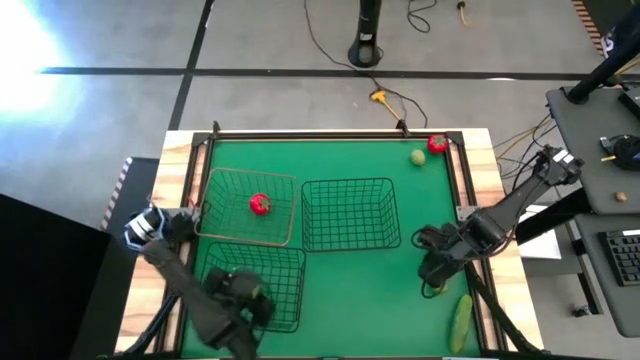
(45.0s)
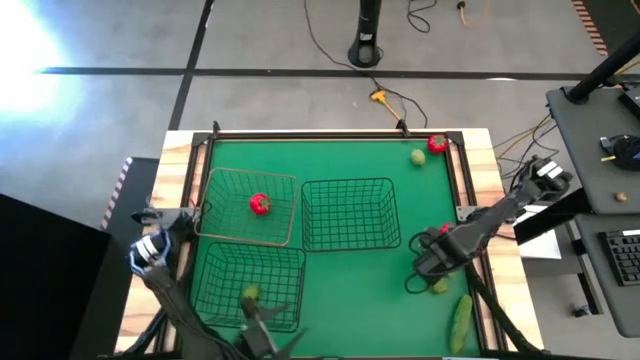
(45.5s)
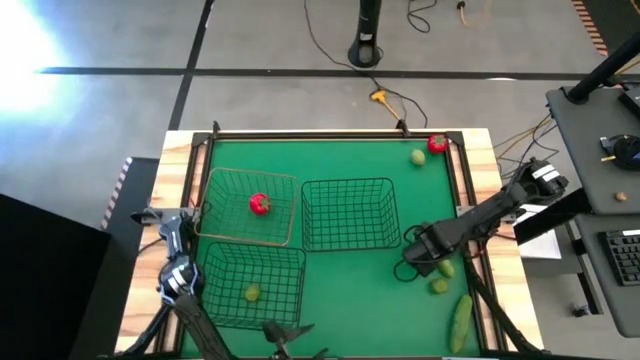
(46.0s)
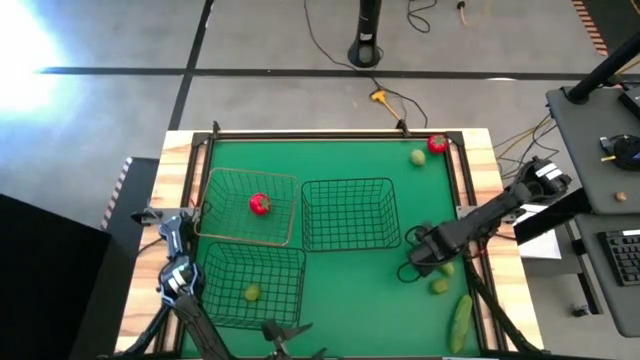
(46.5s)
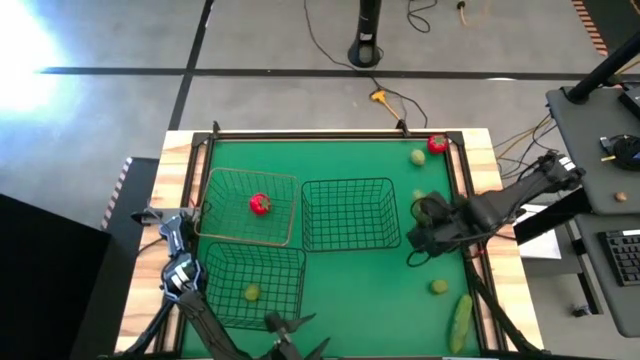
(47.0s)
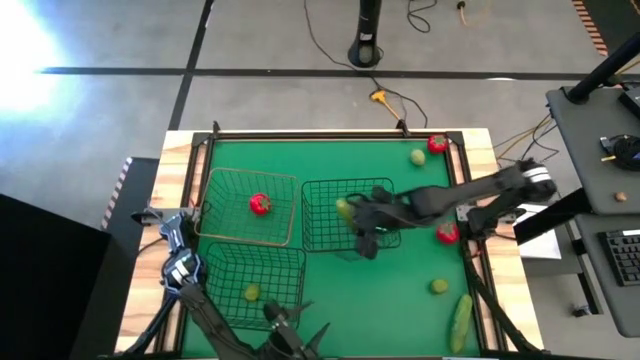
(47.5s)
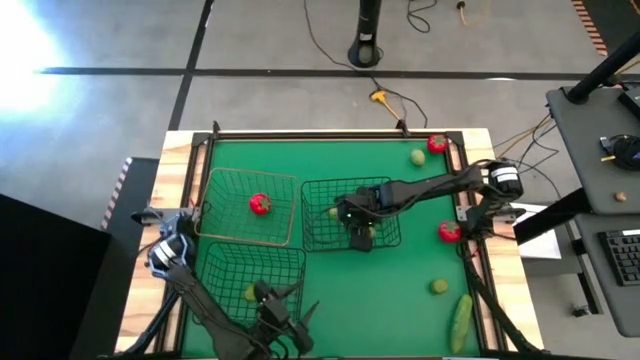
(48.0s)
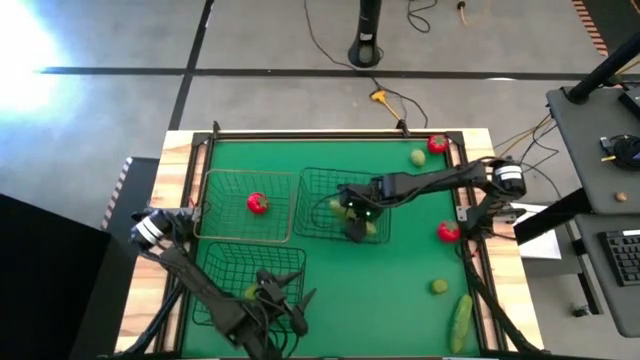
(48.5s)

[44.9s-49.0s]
Task: Sort produce into baskets
Put the top cucumber into the top black wire basket

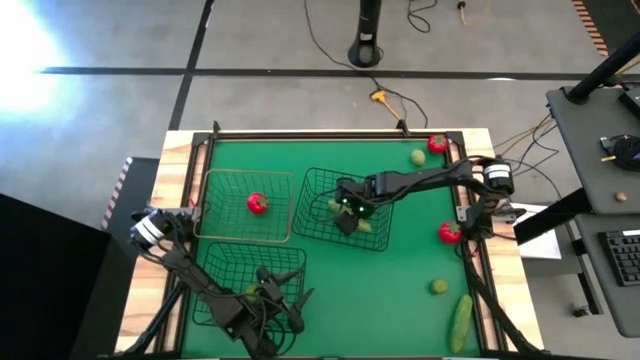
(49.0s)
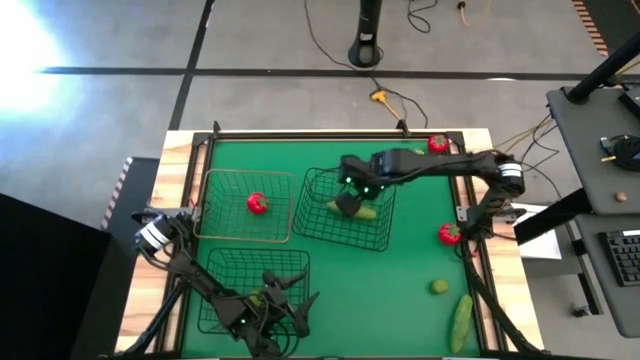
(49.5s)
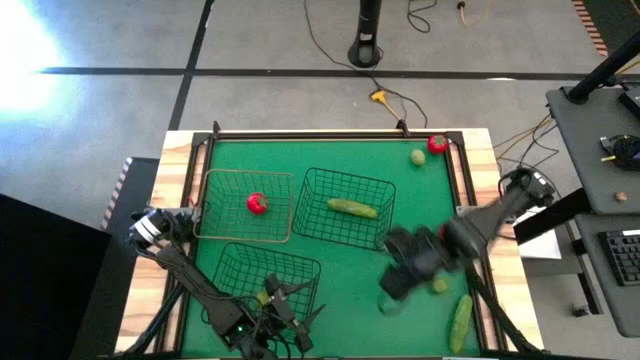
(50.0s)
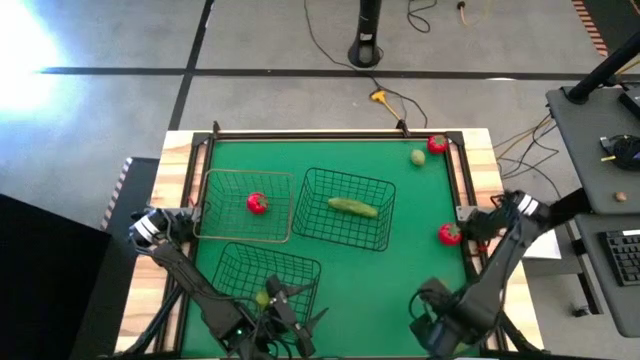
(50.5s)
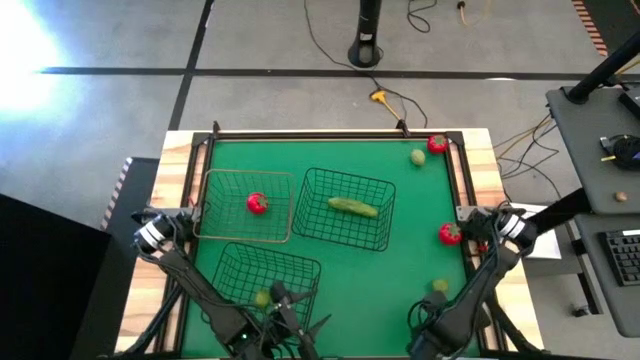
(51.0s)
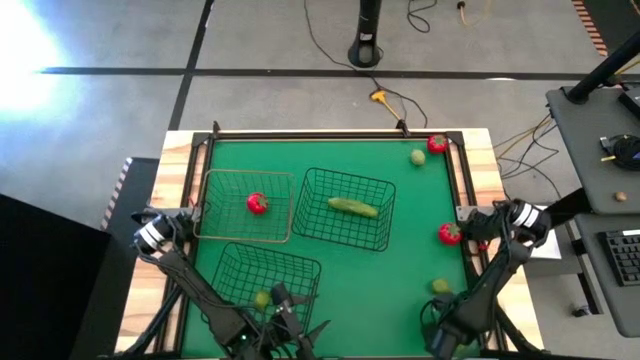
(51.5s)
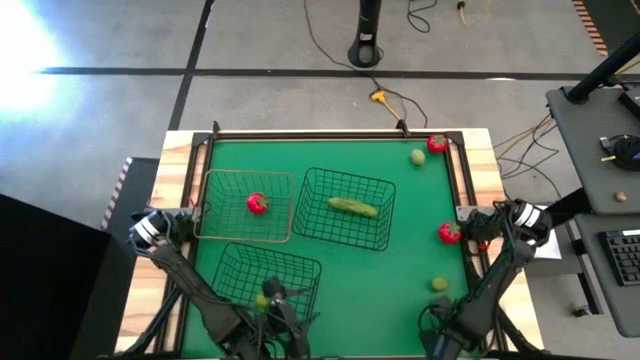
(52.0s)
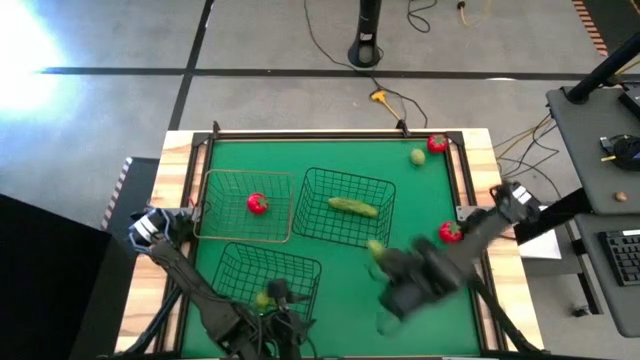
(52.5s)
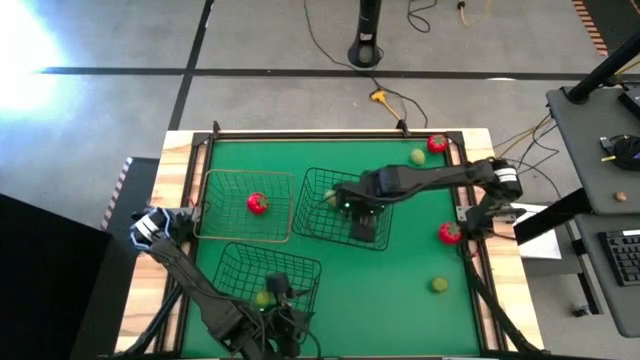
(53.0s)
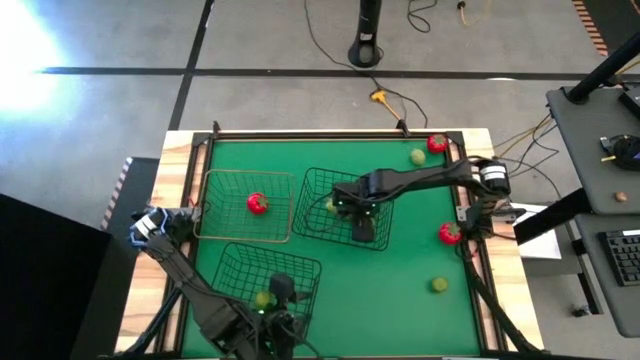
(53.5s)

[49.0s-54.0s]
Put the cucumber into the top black wire basket

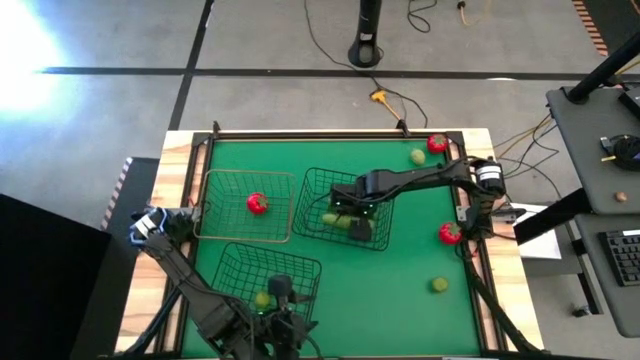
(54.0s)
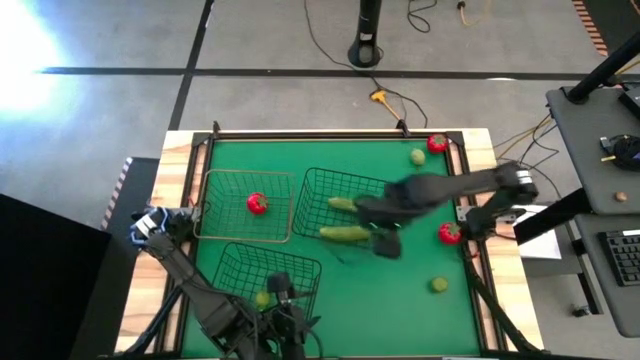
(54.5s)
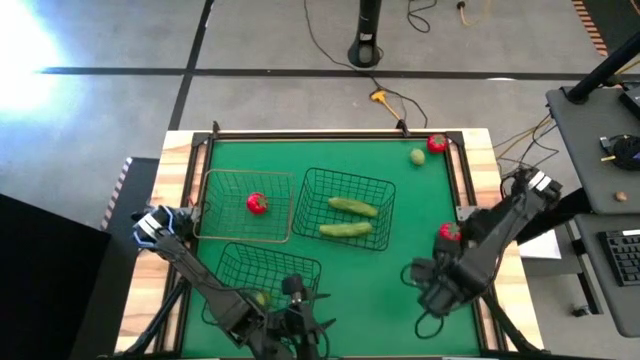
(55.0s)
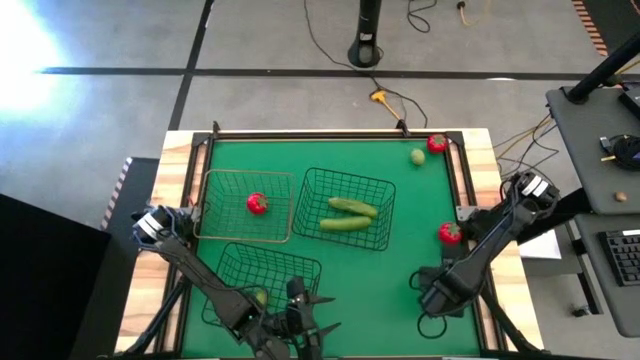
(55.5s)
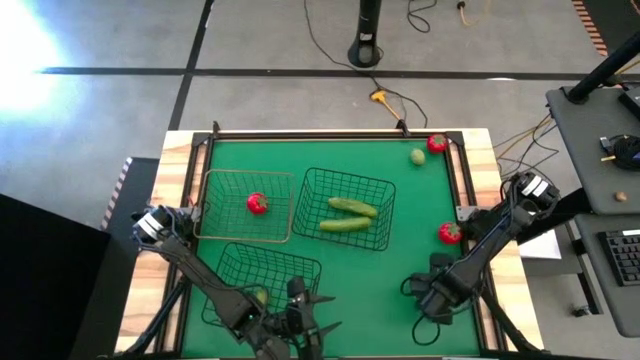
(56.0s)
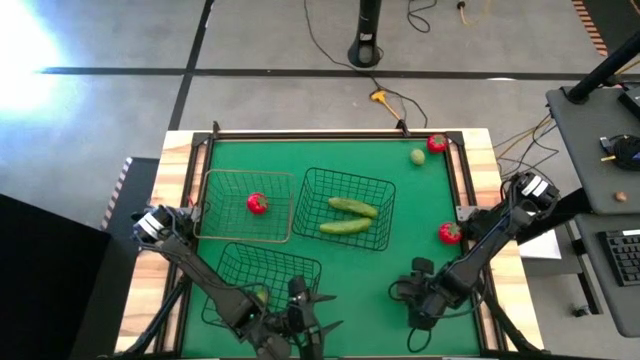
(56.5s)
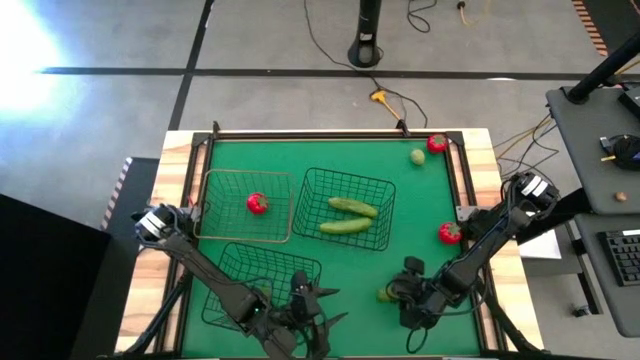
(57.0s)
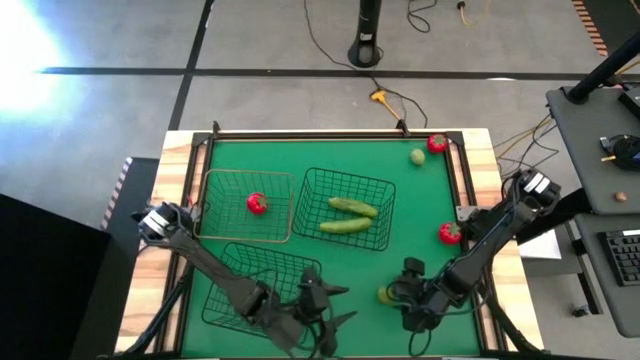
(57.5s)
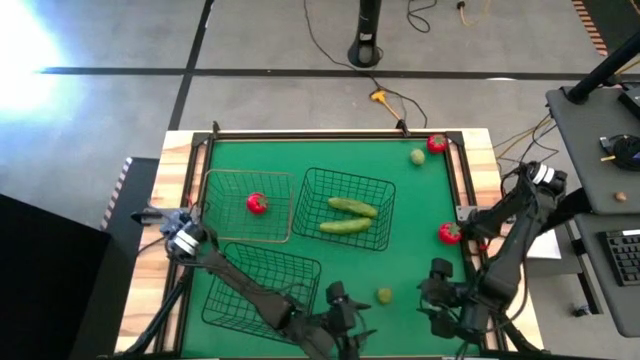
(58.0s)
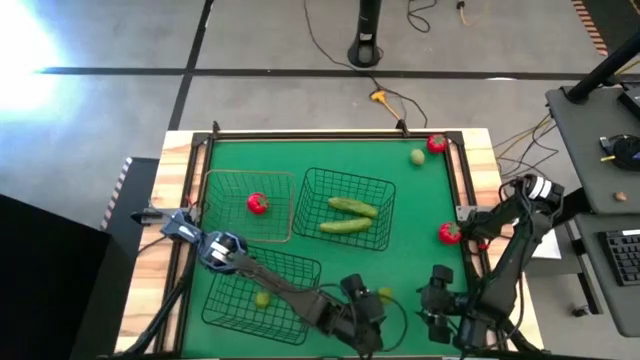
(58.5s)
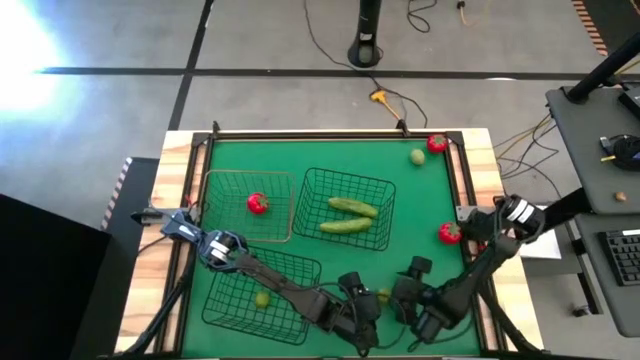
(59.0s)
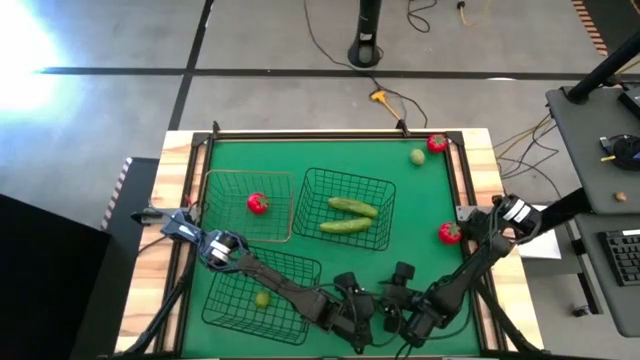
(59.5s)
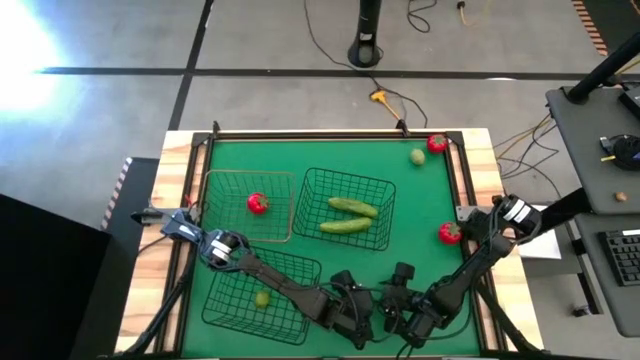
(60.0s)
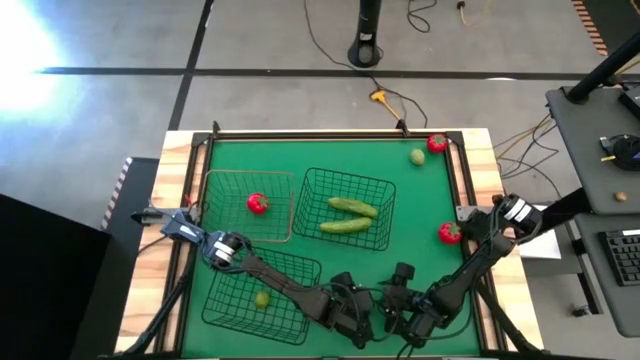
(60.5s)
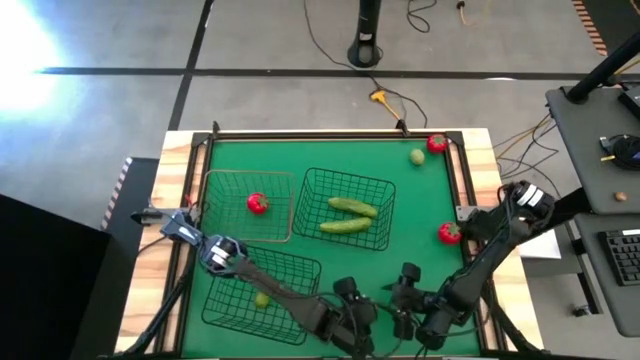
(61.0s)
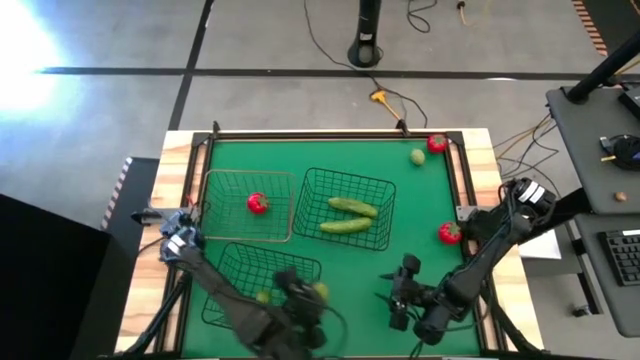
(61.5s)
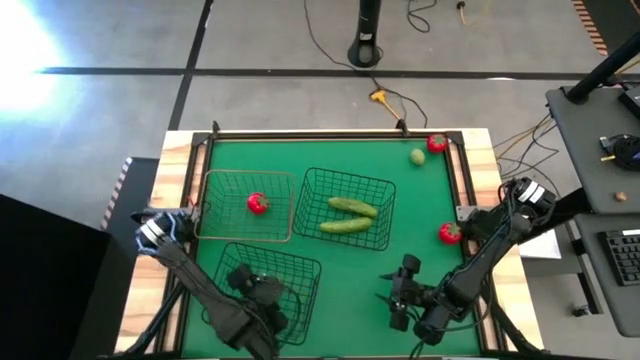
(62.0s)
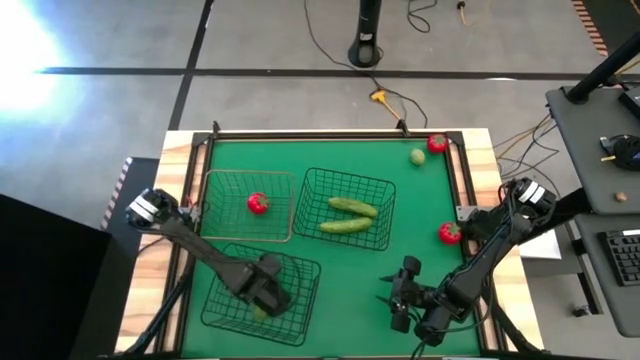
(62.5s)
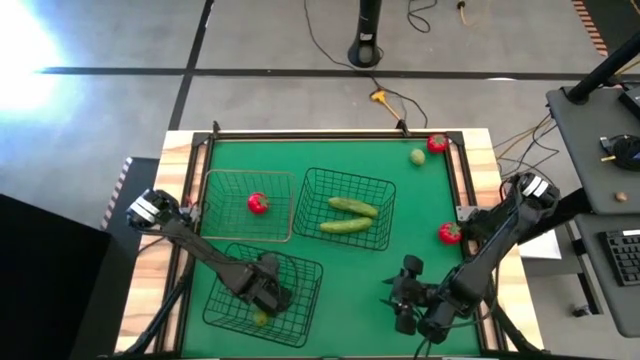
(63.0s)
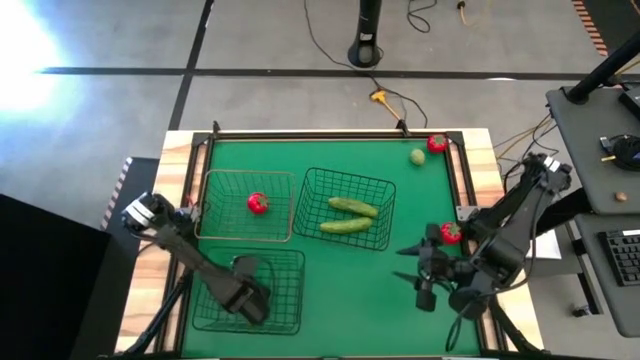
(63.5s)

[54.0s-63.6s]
Put the bottom lime into the bottom black wire basket

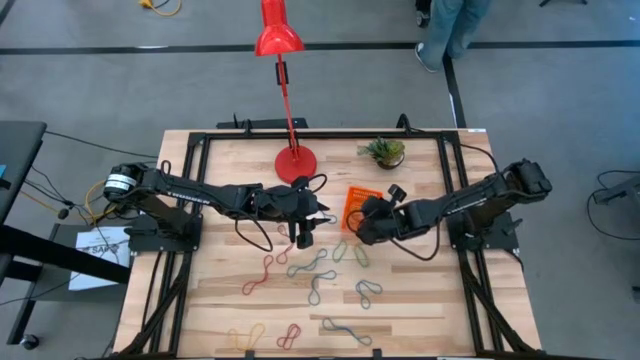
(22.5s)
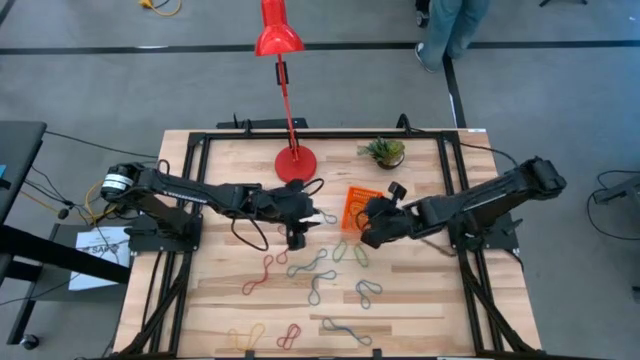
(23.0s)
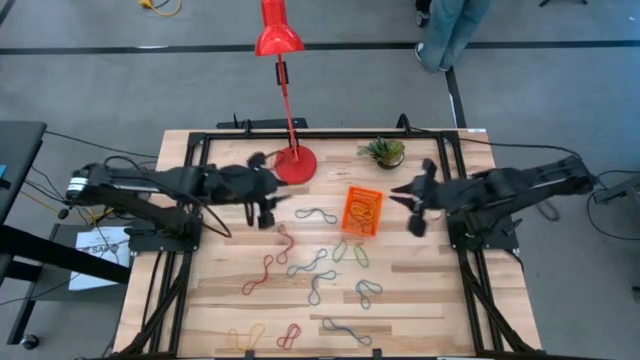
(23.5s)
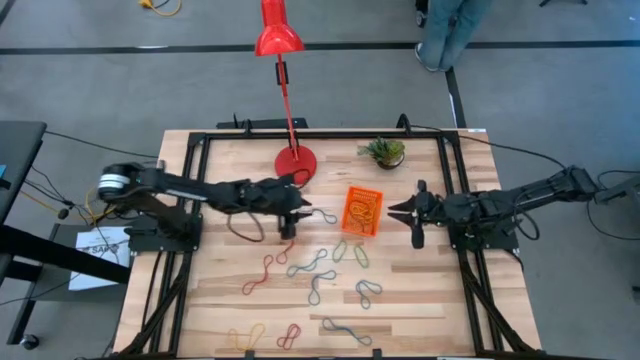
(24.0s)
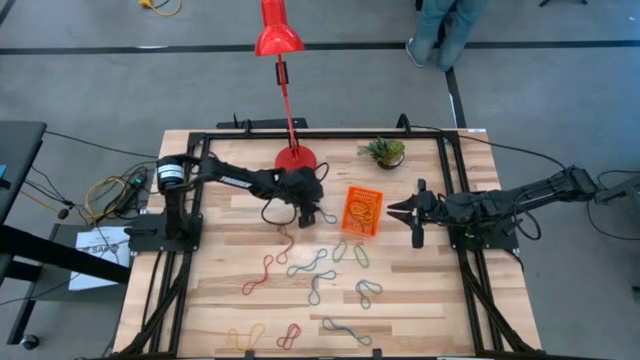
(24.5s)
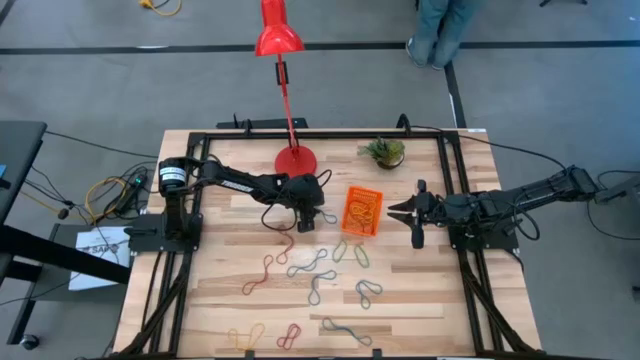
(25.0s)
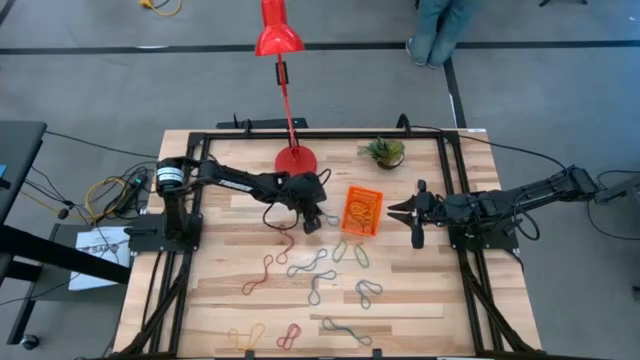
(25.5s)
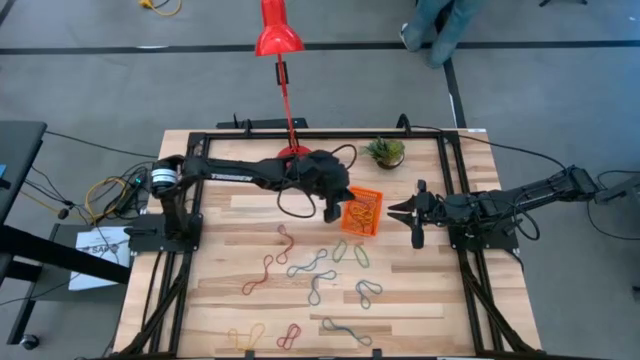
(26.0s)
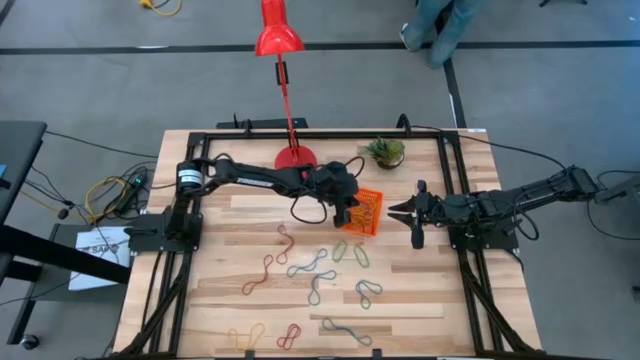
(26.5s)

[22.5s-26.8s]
Task: Pick and place items into bin
Put the top blue rubberband into the orange basket
